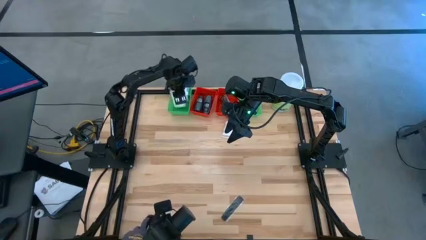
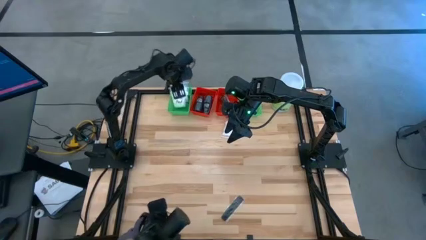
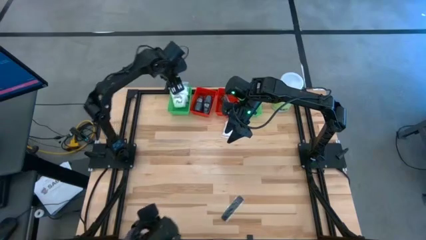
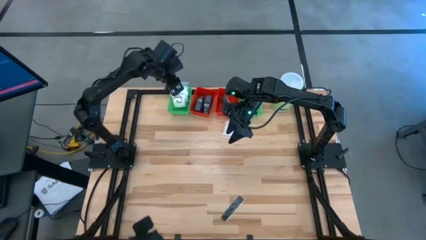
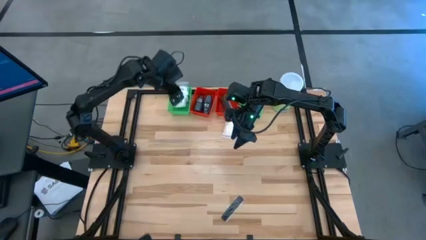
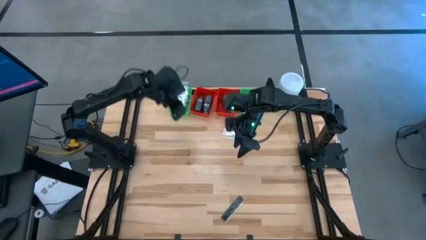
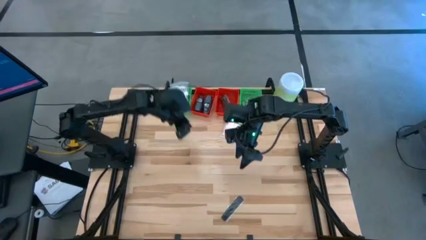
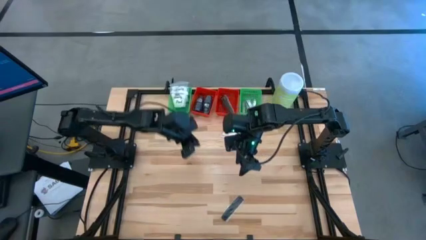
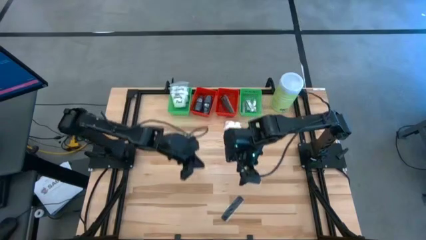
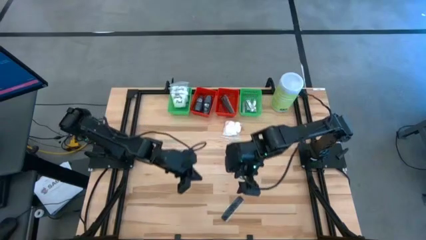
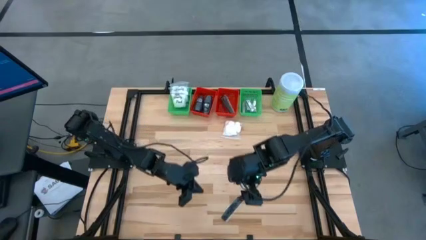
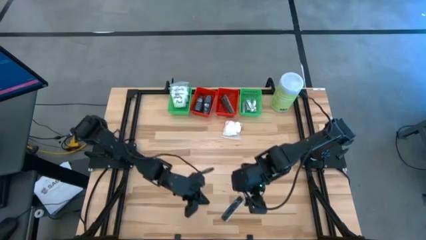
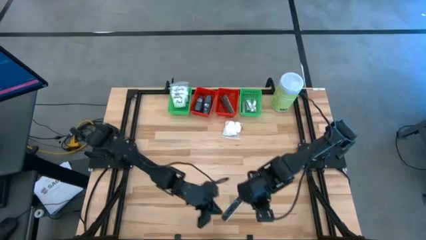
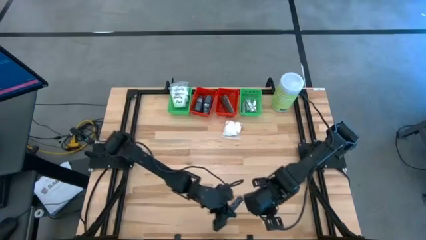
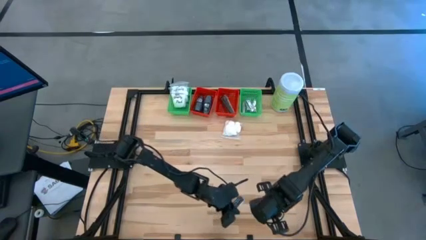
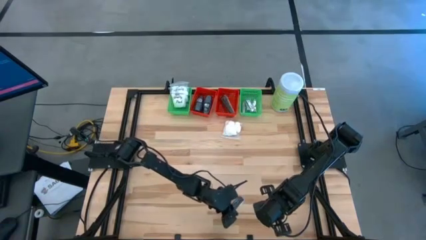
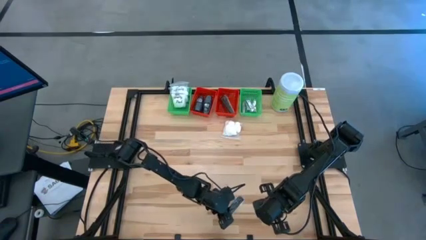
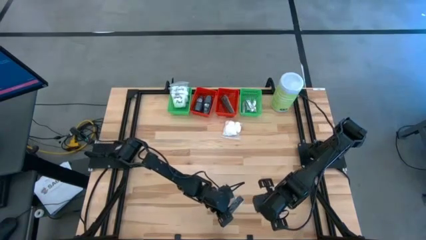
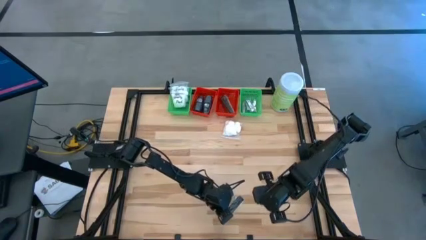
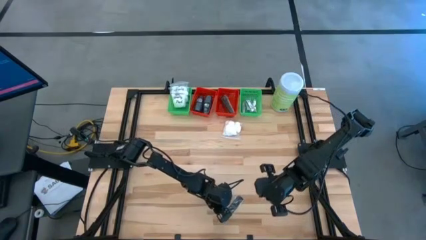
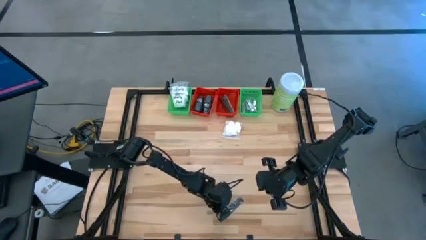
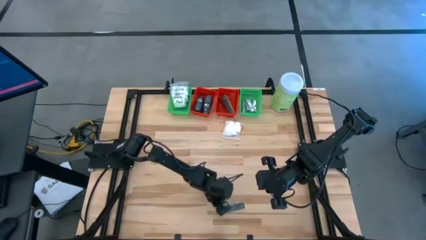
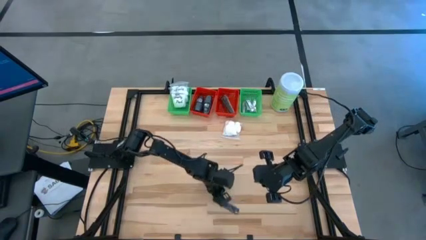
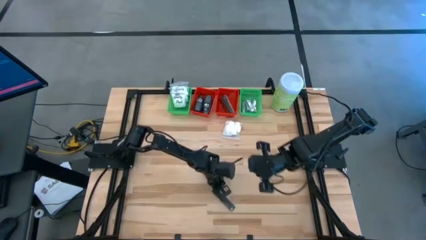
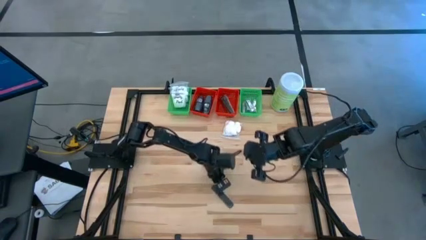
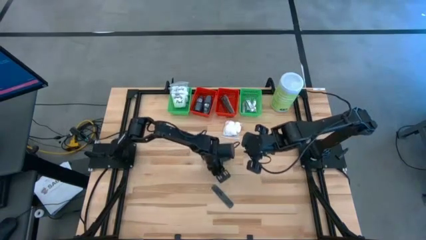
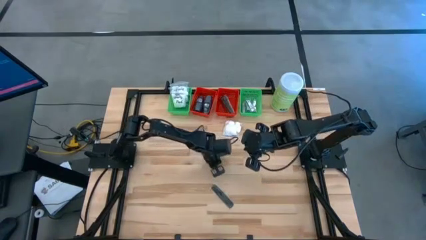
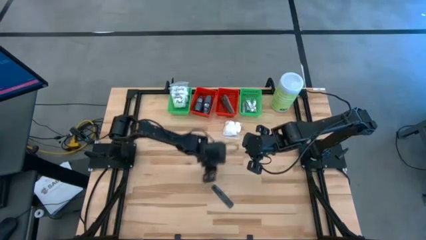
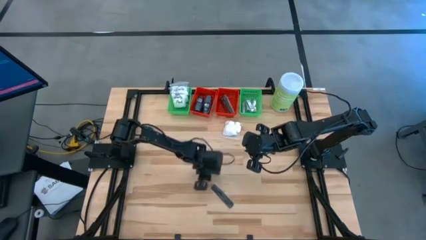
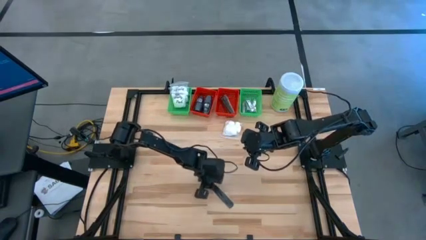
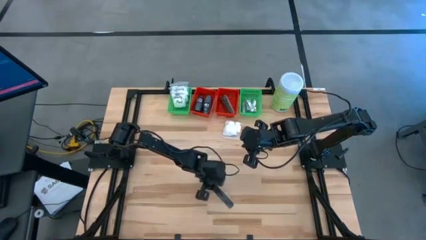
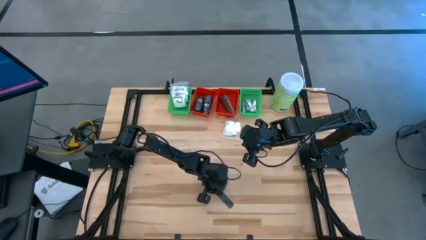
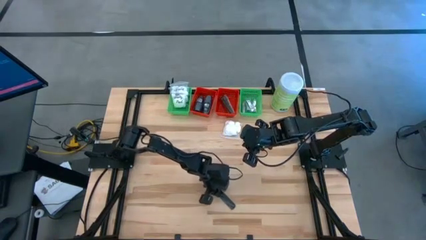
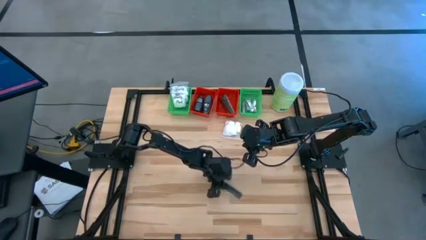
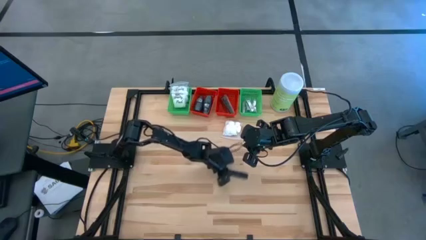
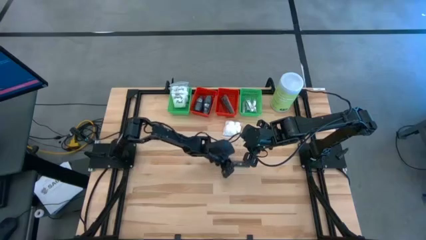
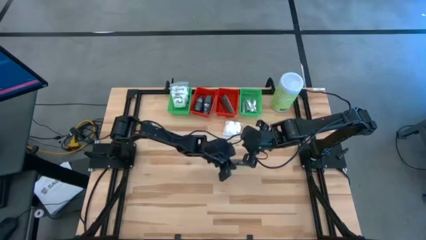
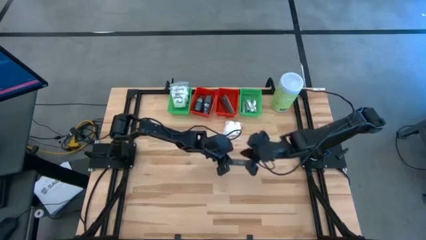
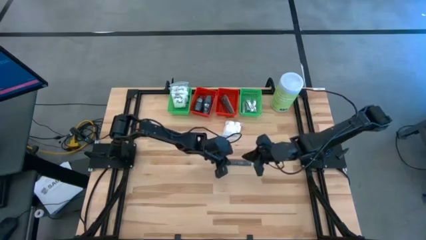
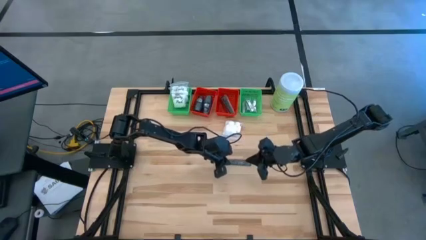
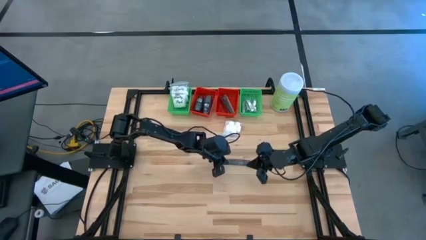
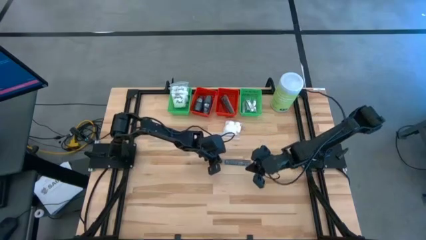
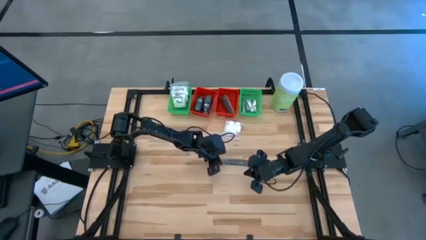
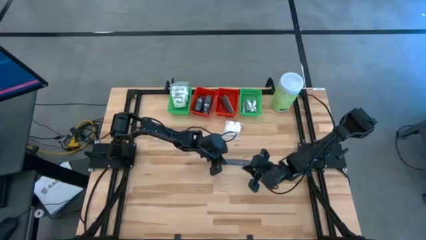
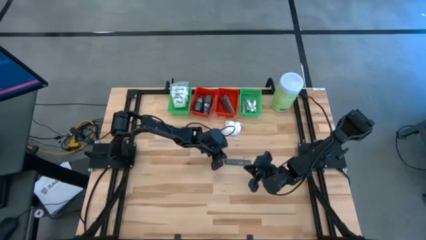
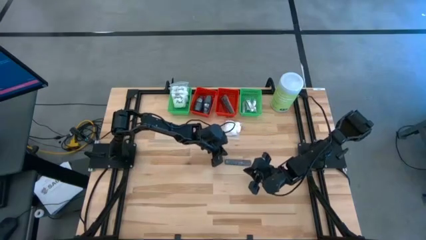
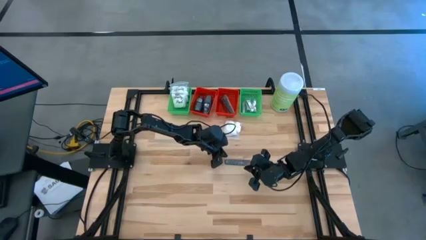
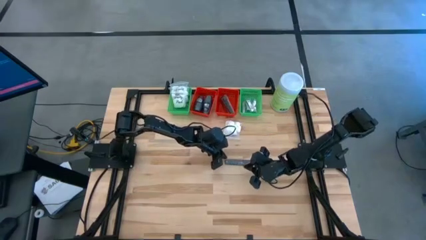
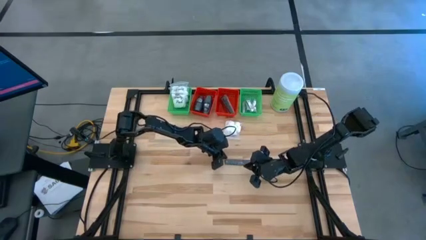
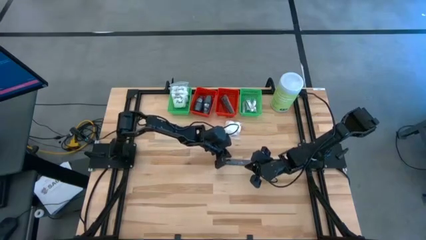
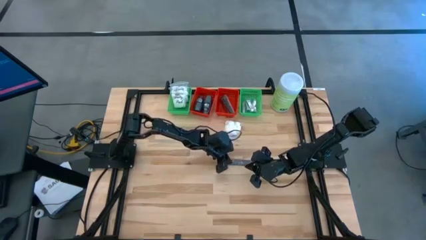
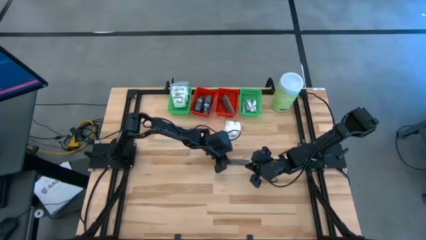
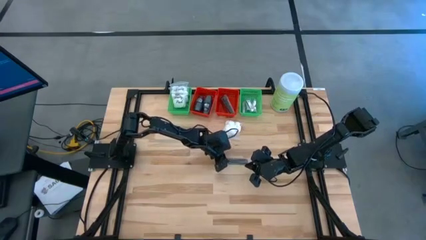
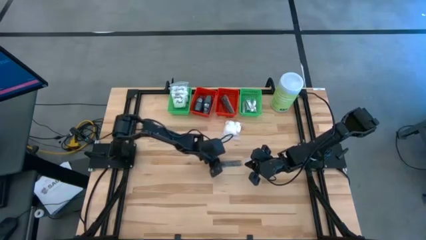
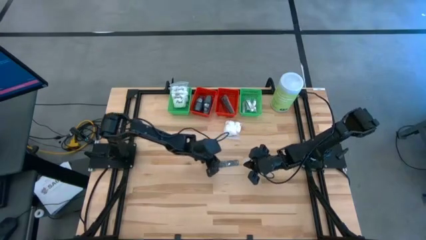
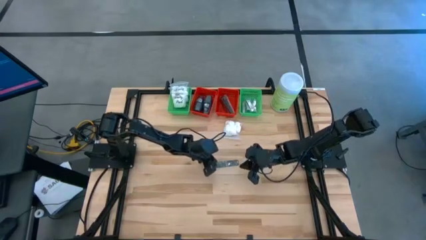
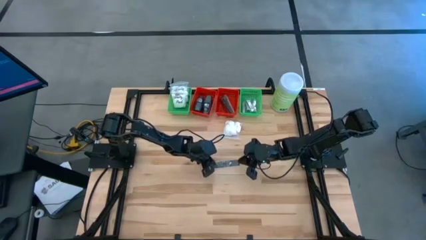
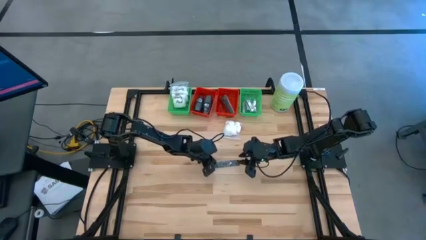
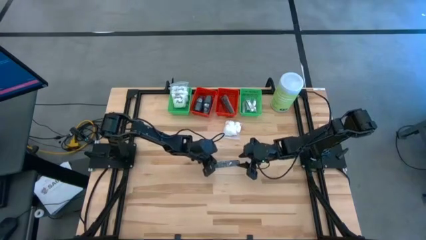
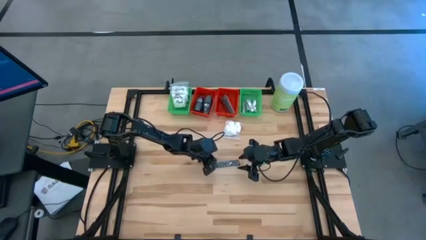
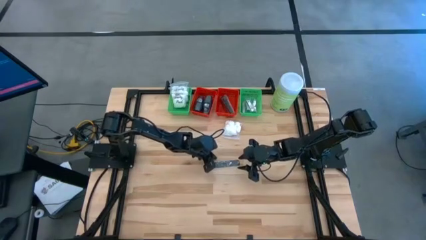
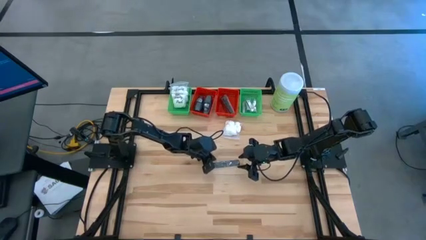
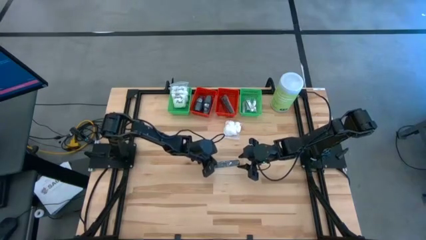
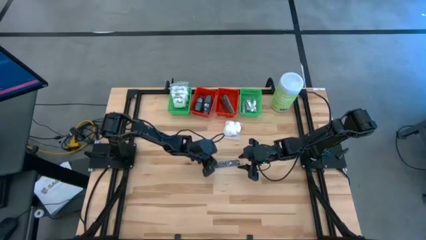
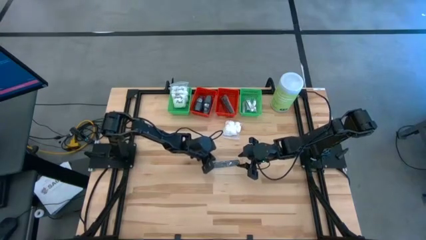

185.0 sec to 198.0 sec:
Task: Pick & Place Travel size toiletries
Put the comb into the right red basket

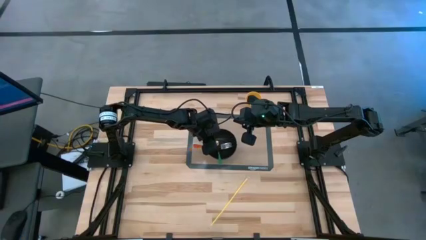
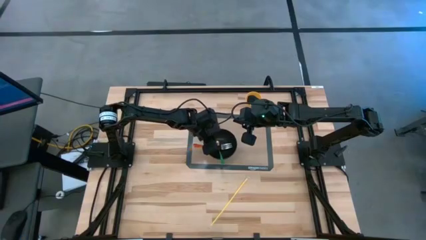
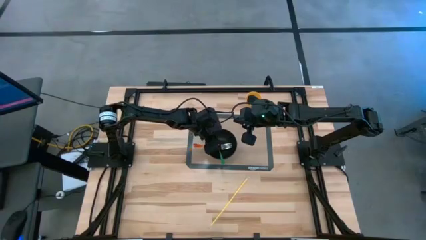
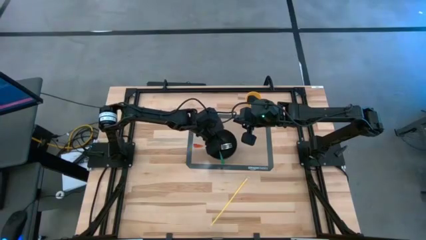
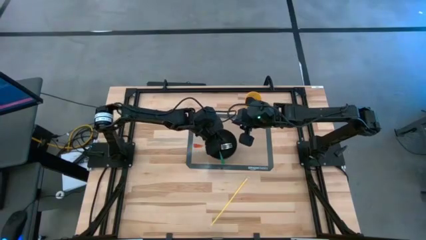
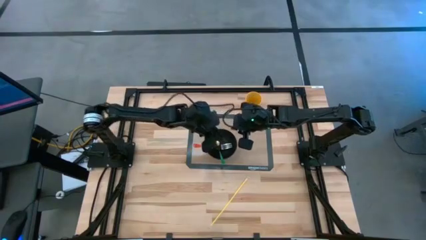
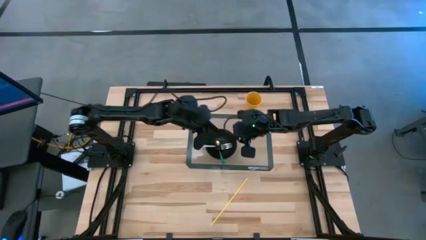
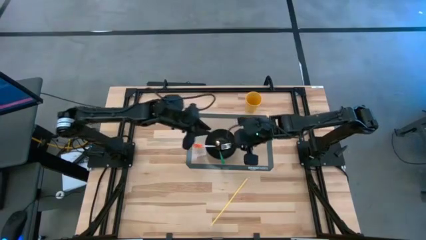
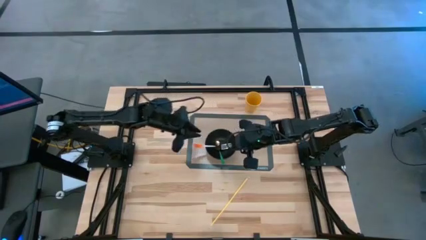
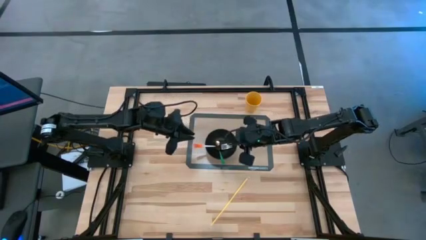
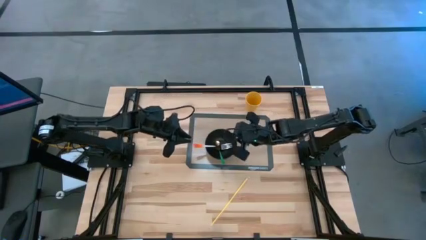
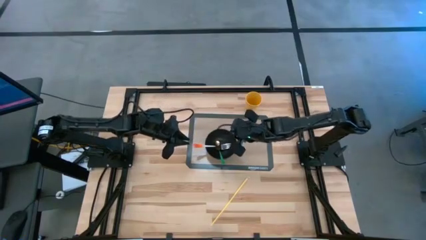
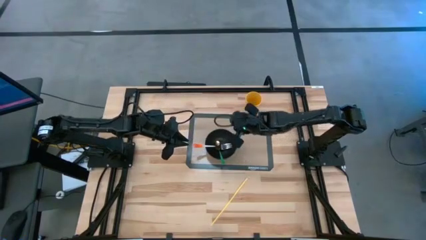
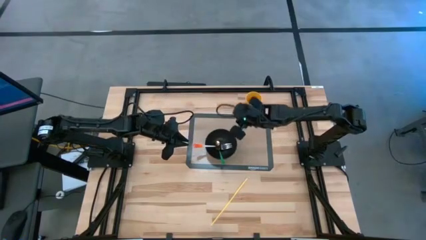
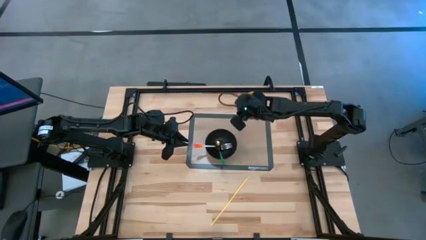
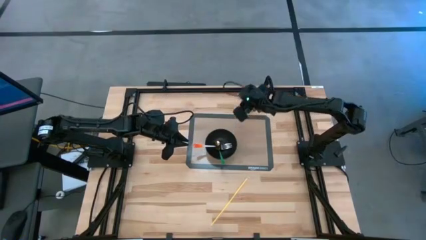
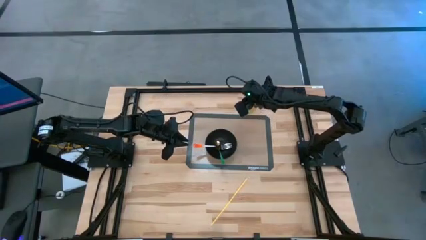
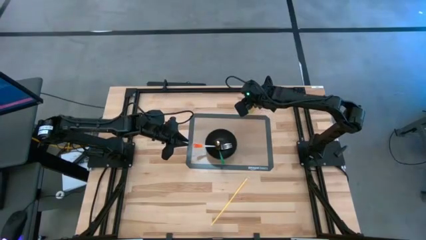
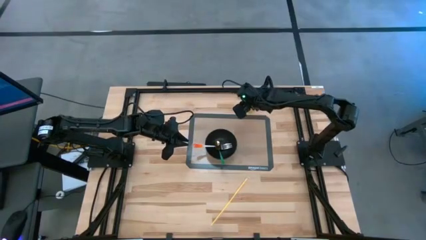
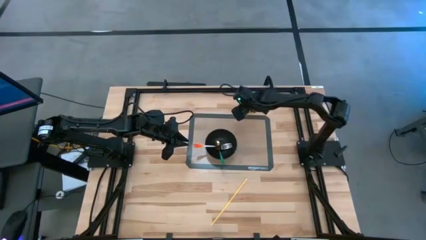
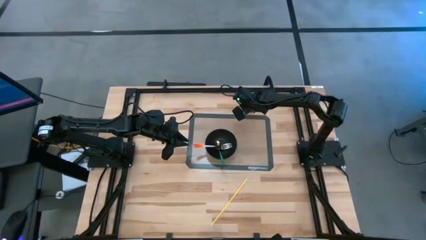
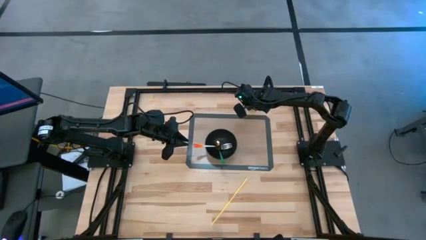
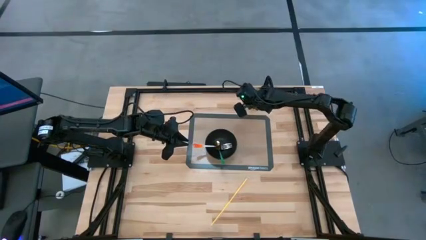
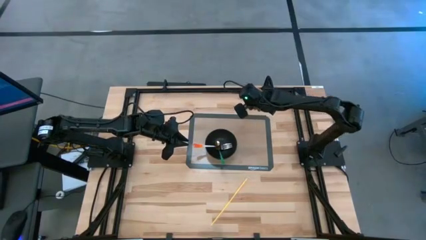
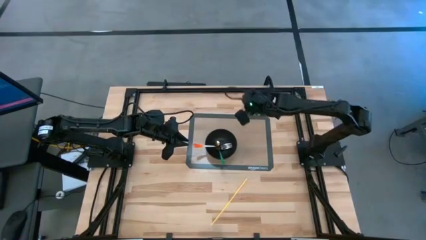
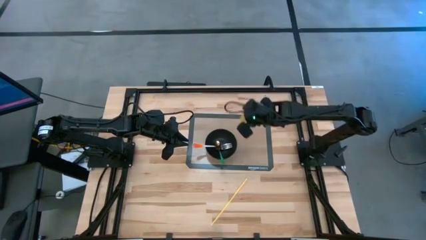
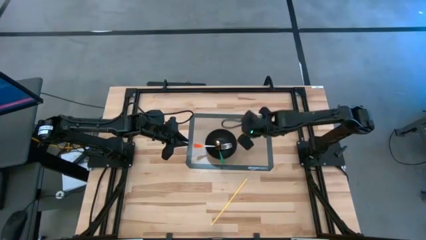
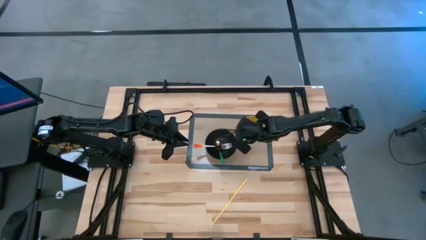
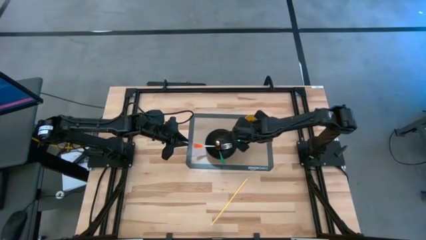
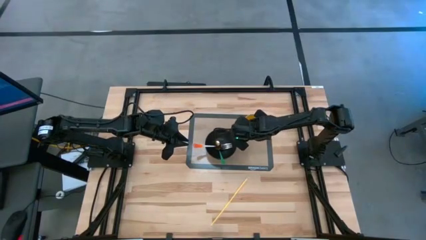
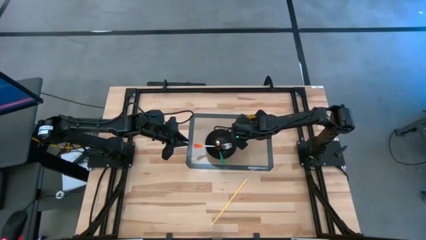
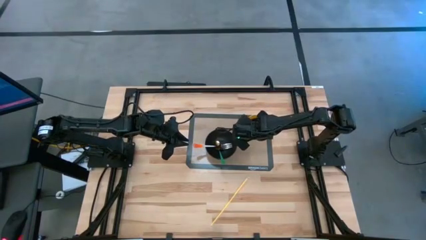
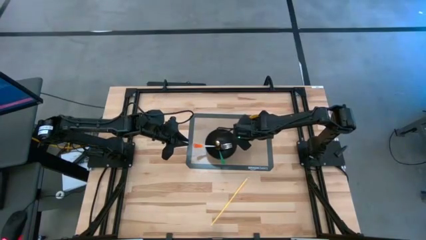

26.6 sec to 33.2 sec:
Task: Pick & Place Utensil
Put the yellow cup on the top right of the transparent mat
